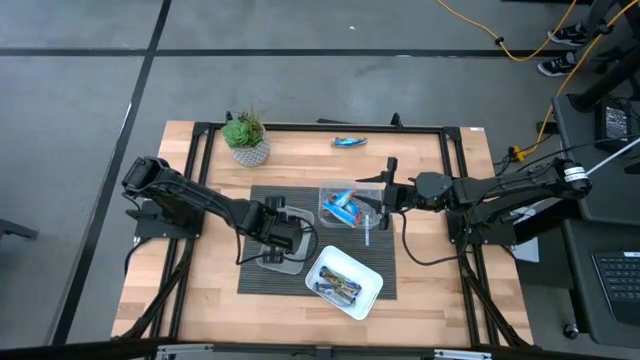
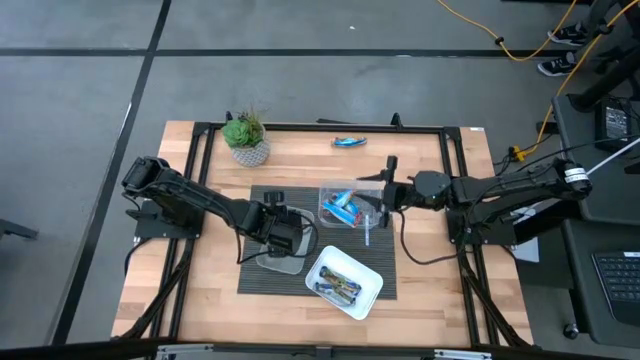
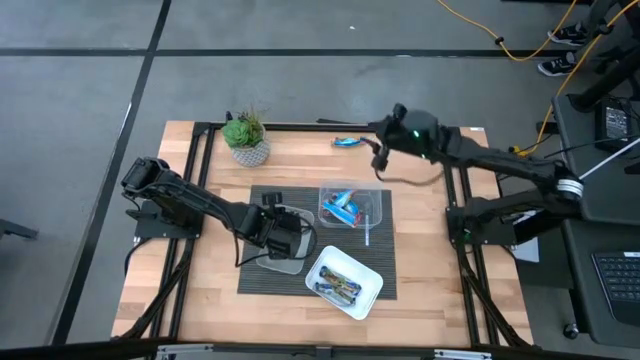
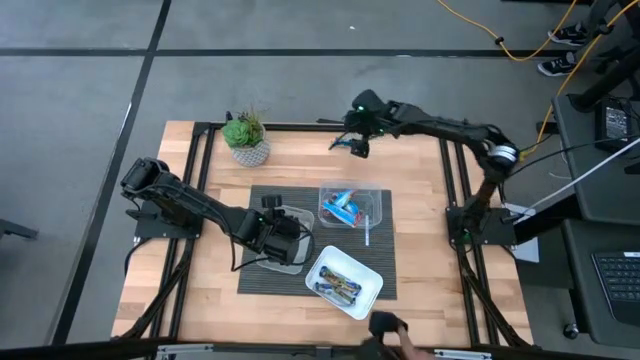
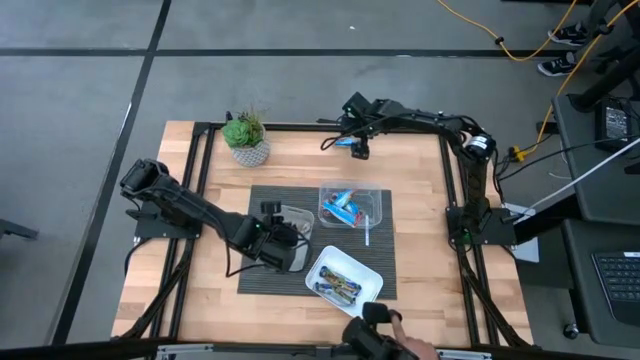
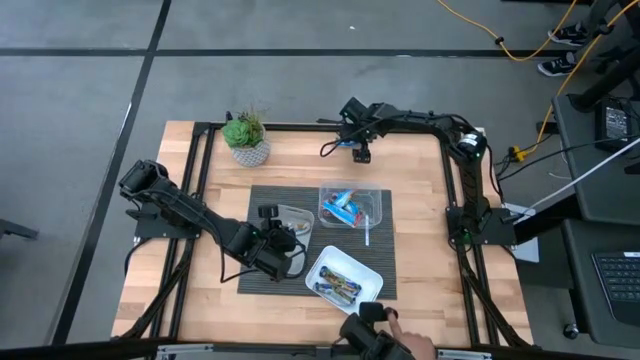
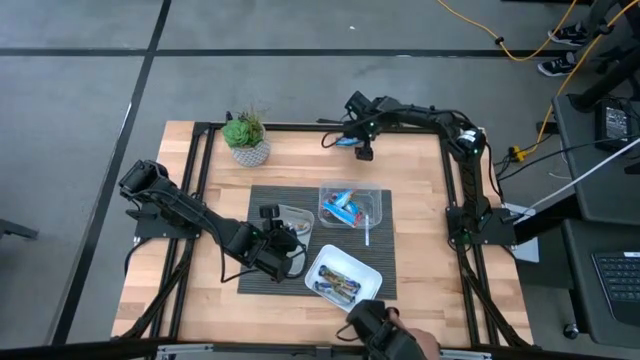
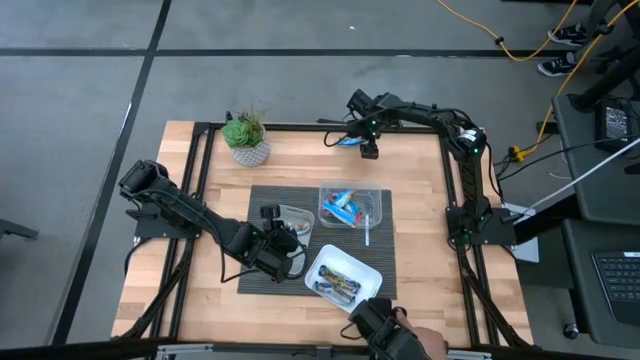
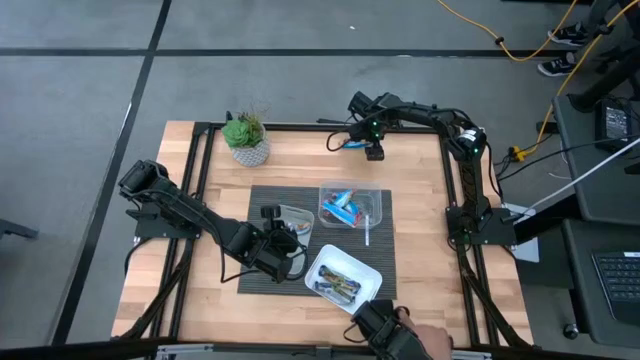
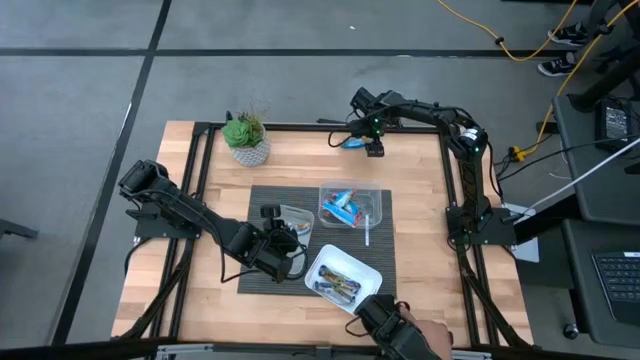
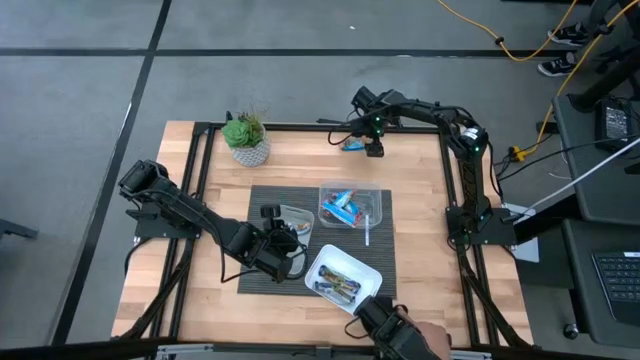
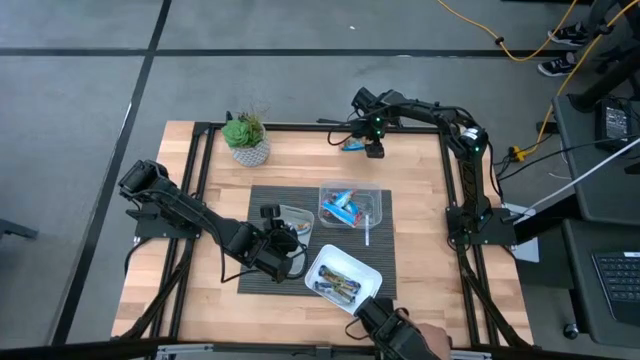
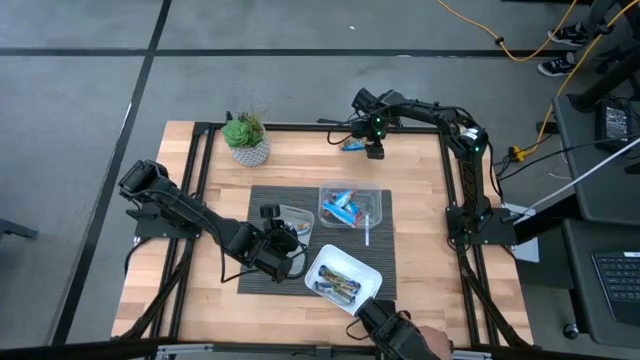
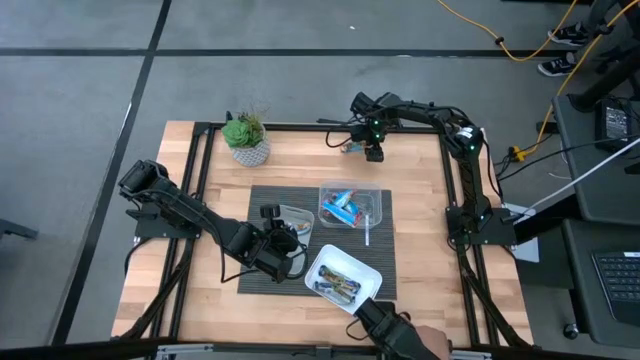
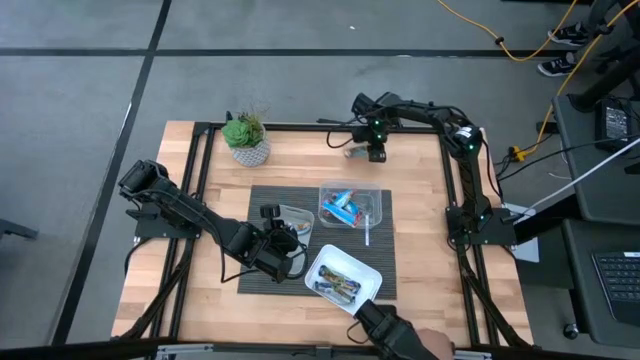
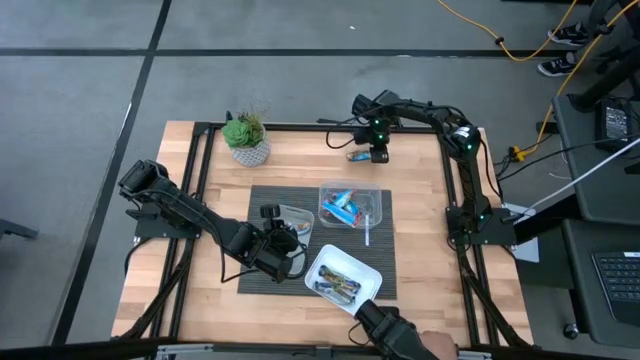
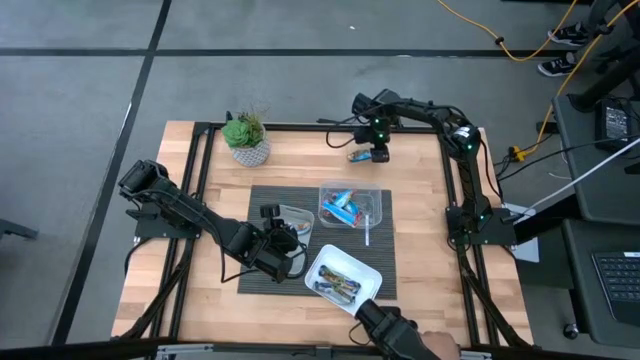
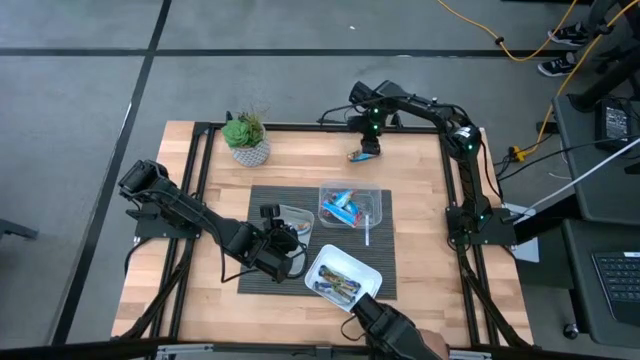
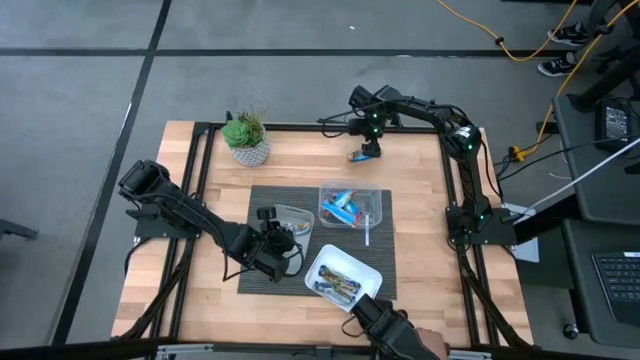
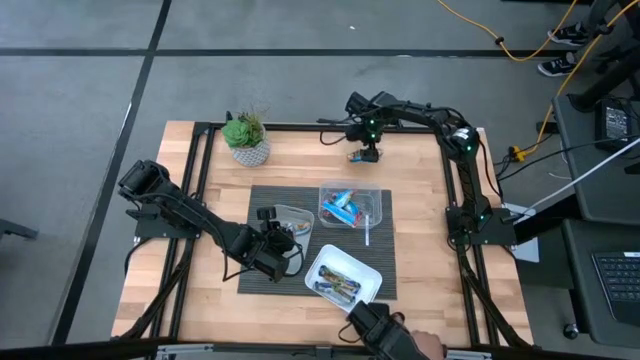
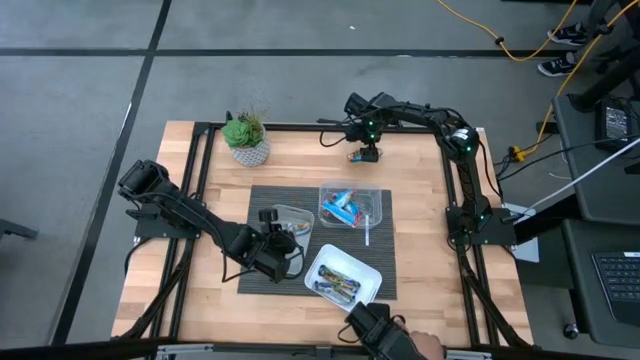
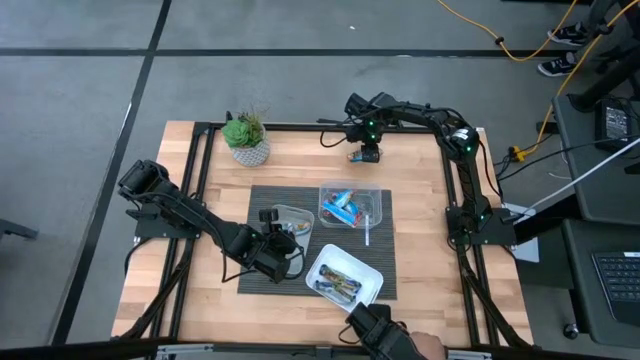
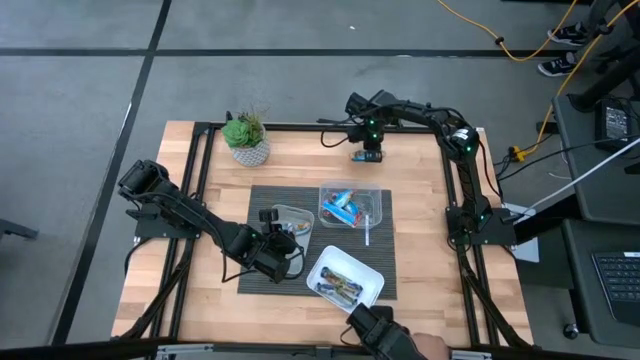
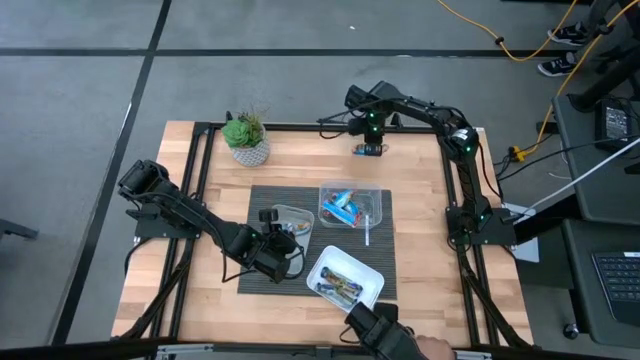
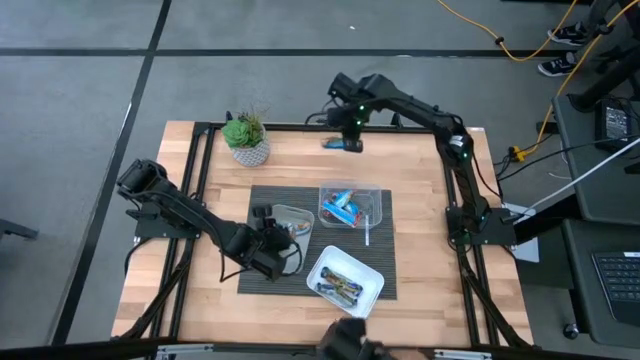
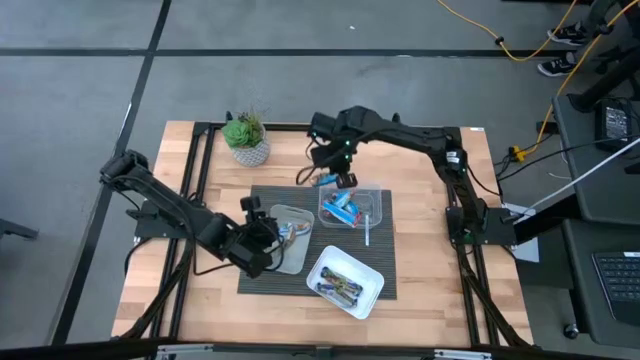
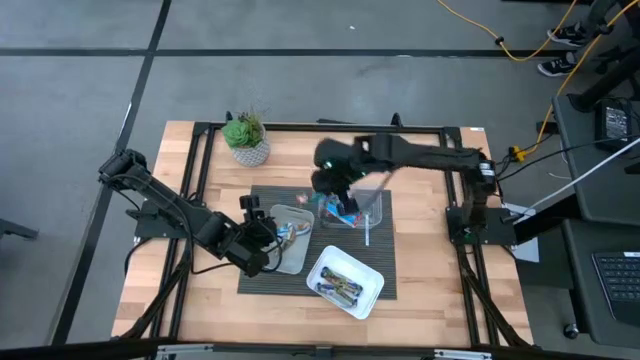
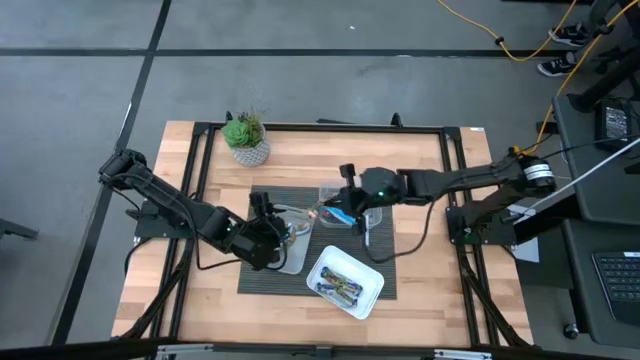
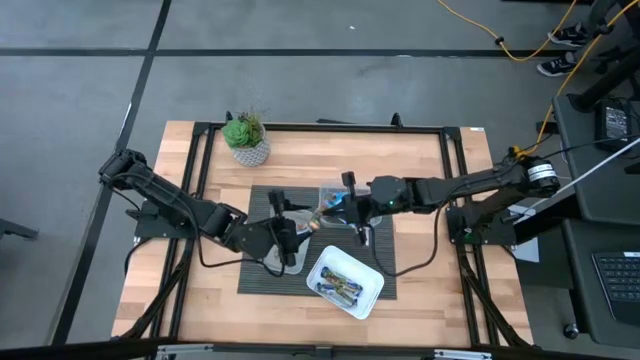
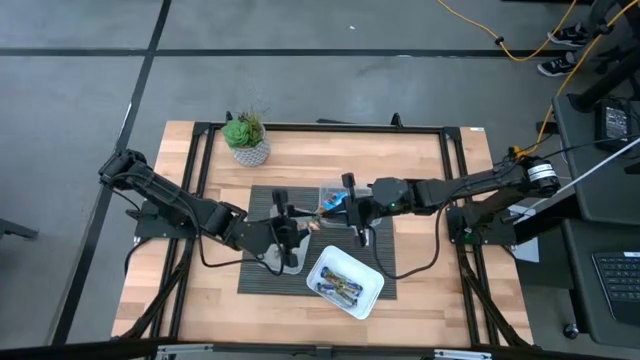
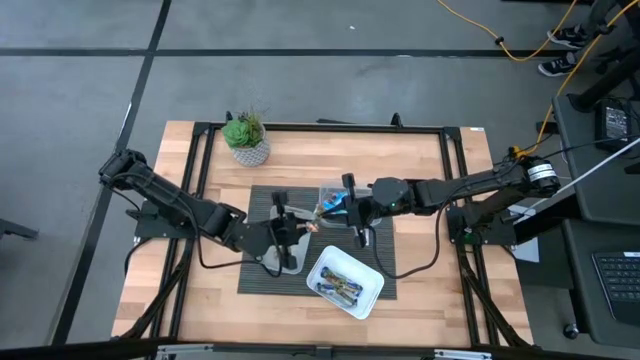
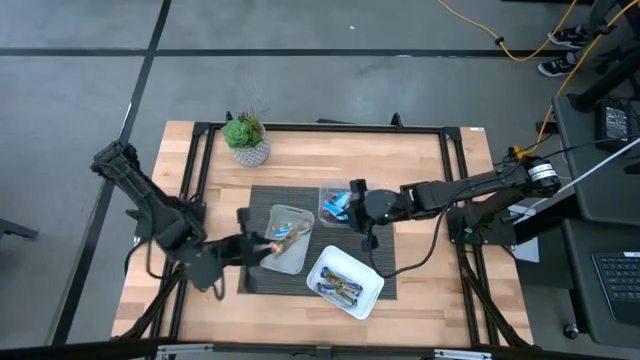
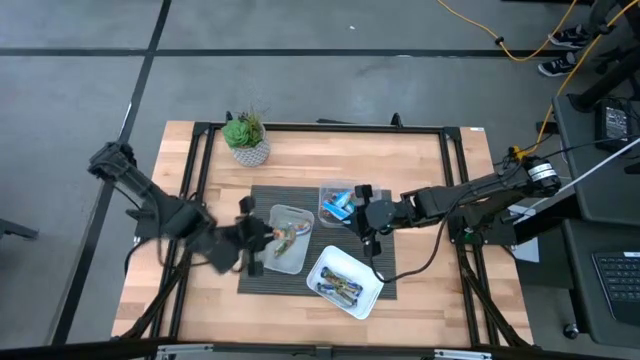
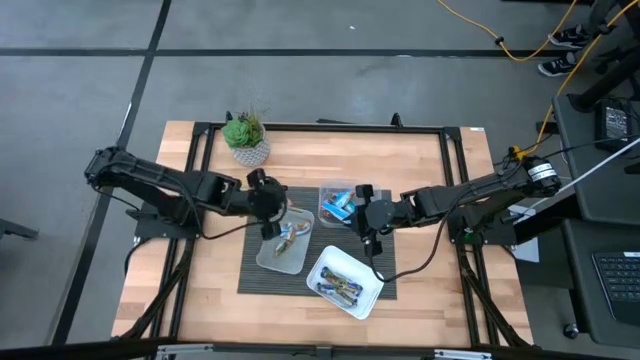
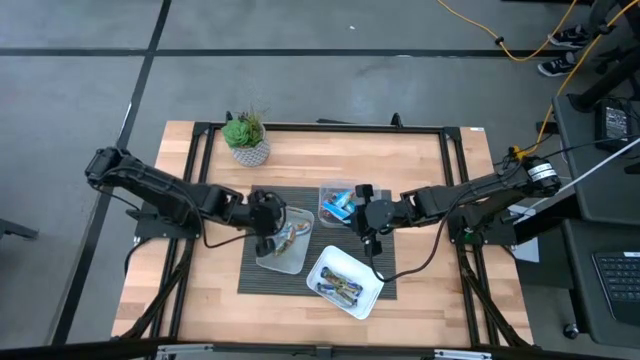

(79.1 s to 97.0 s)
Task: Pick and place Granola Bars by type
Put the orange granola bar into the gray bin

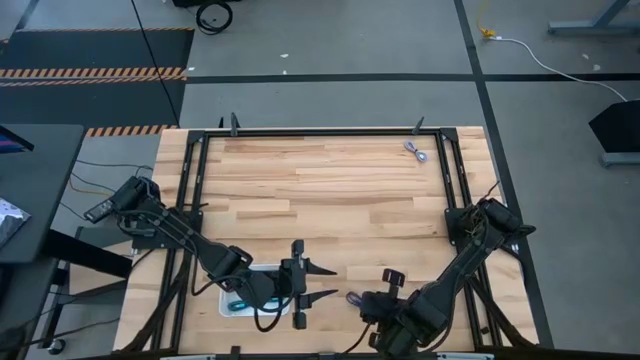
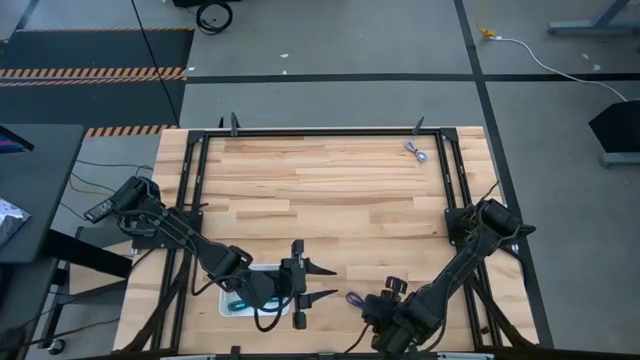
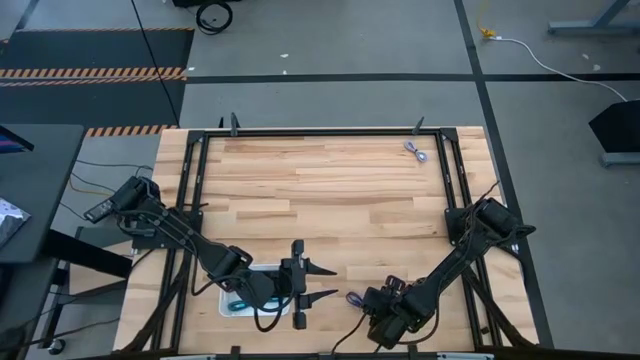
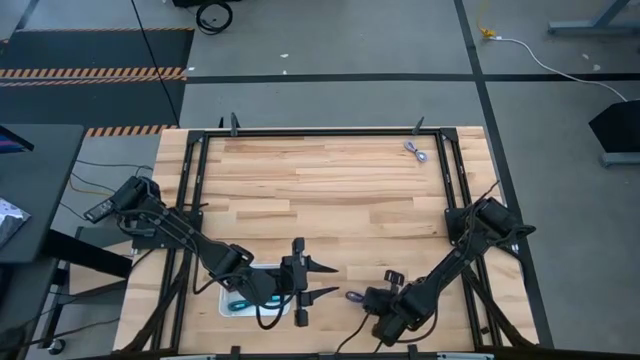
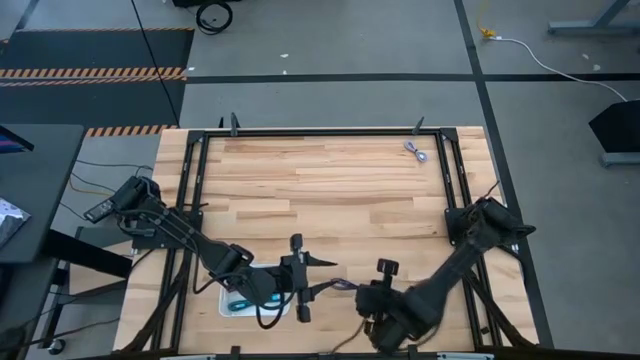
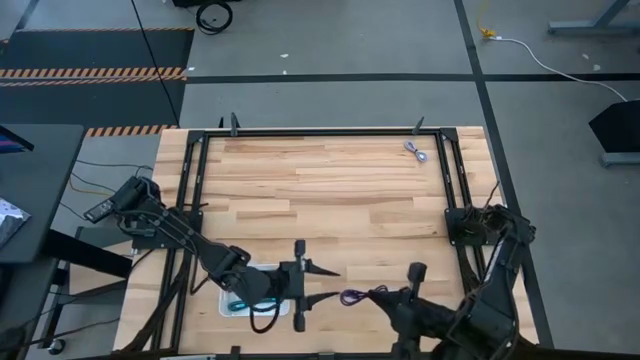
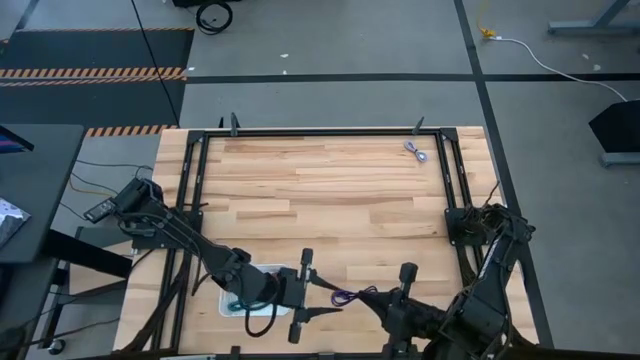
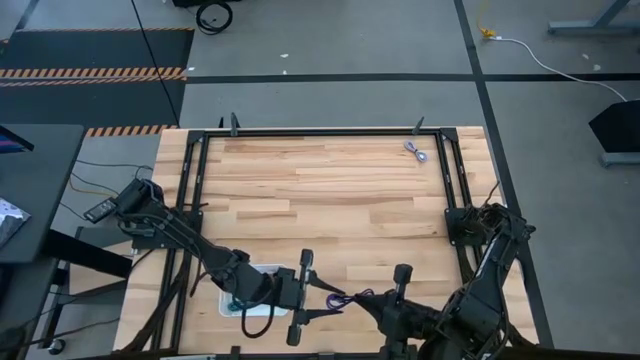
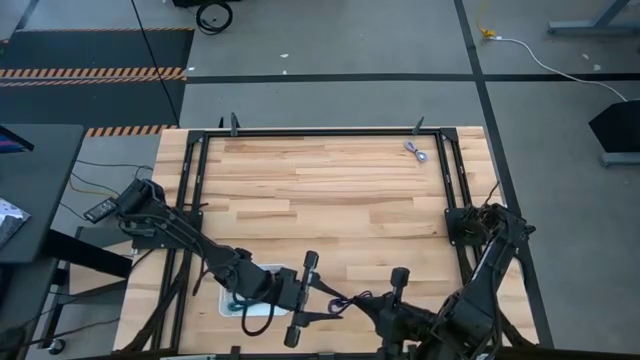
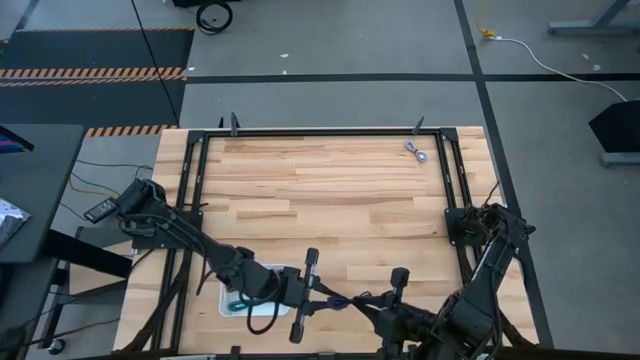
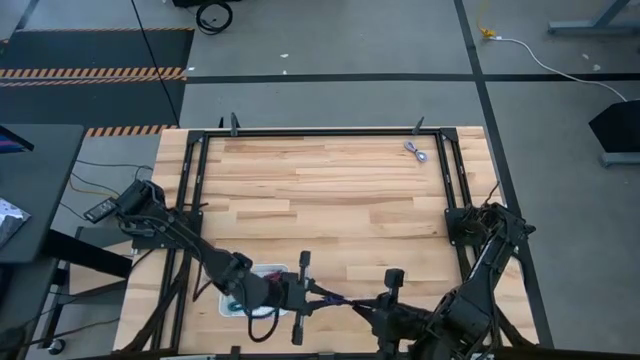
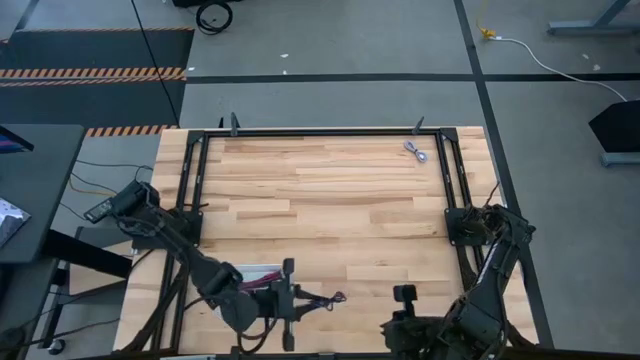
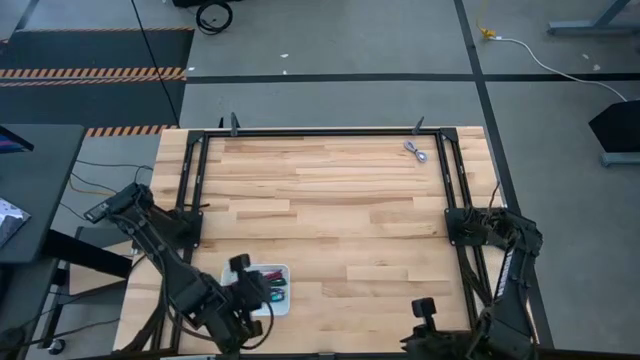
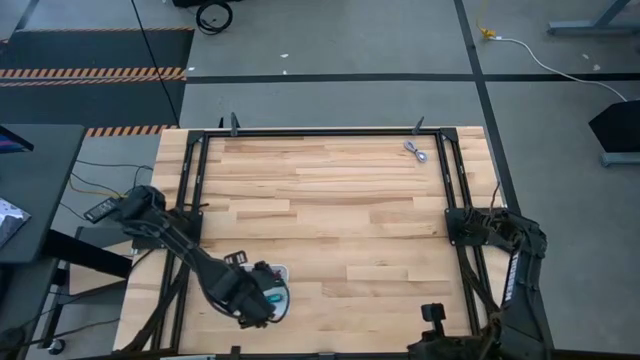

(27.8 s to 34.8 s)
Task: Pick and place USB-C Cables
Put the blue charger cable into the white bin
